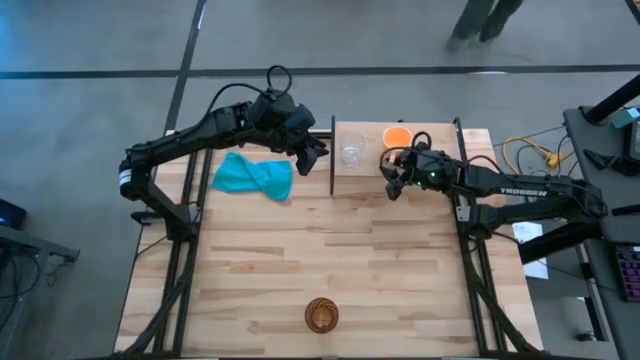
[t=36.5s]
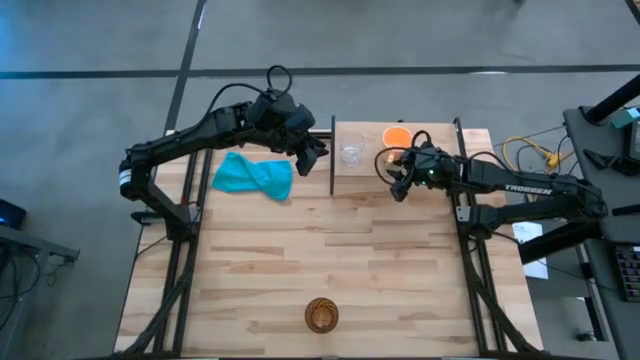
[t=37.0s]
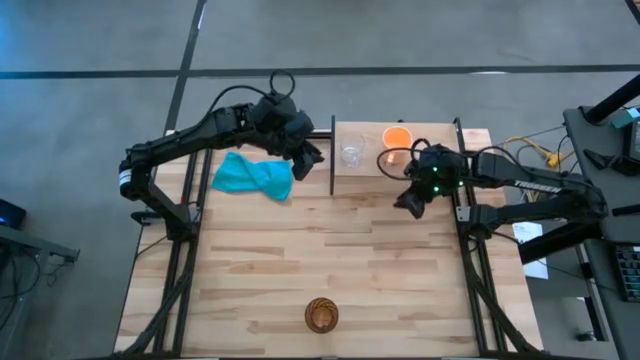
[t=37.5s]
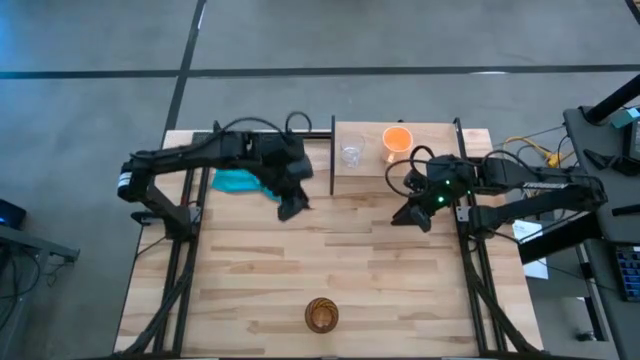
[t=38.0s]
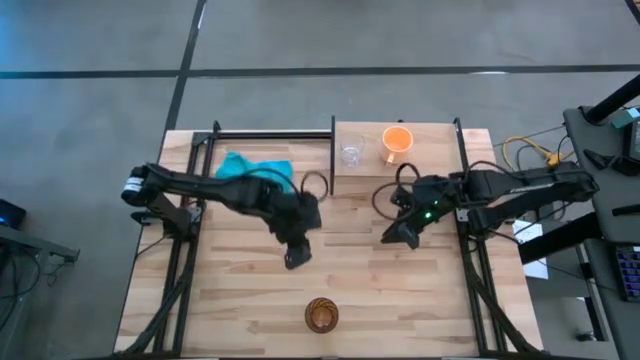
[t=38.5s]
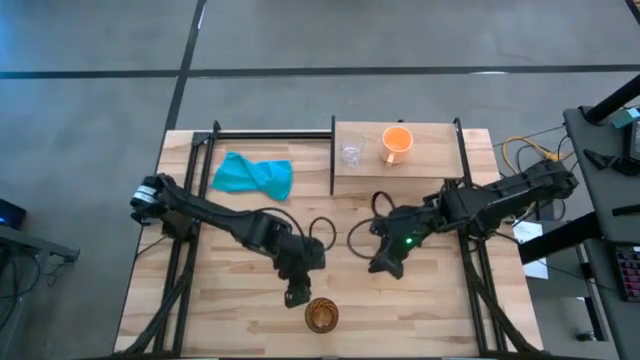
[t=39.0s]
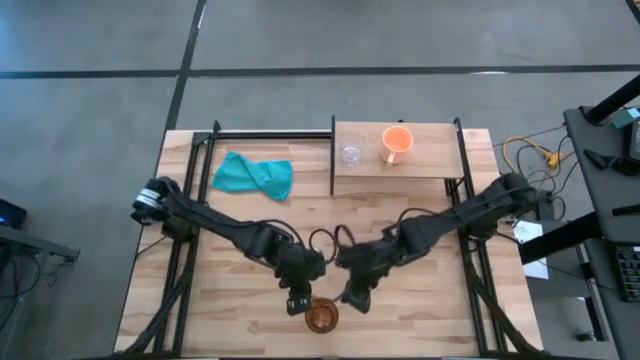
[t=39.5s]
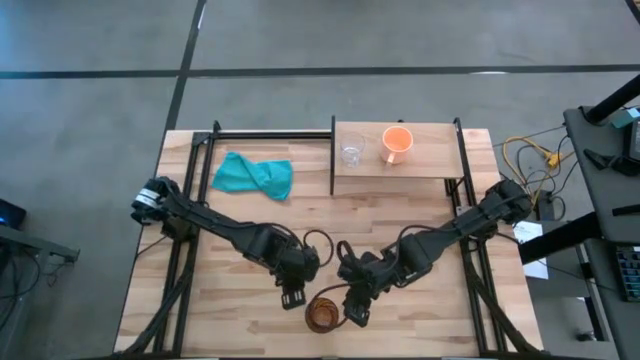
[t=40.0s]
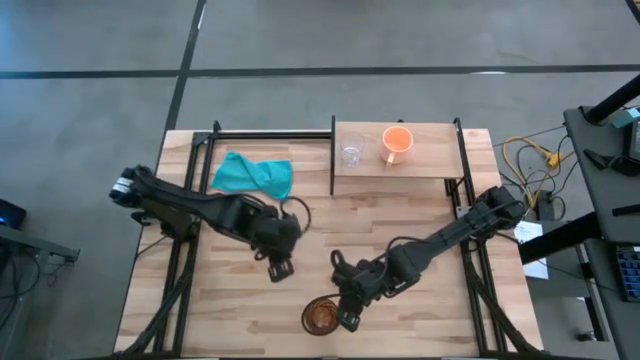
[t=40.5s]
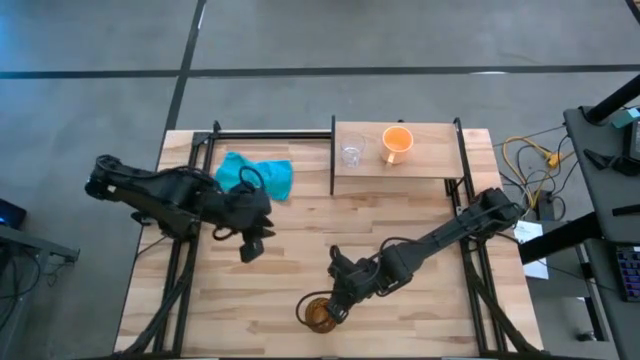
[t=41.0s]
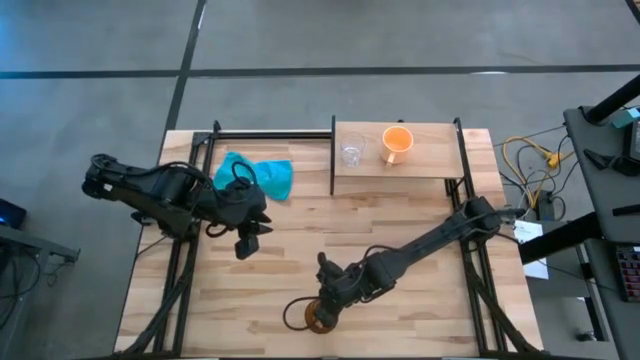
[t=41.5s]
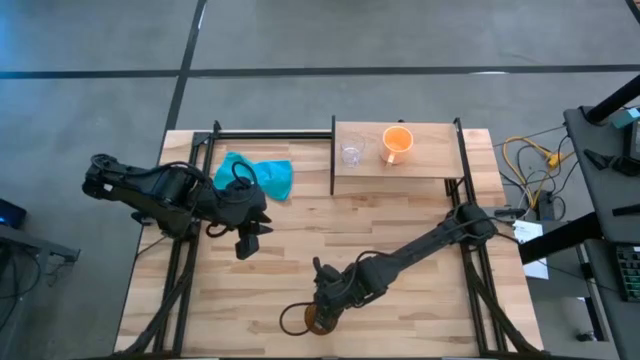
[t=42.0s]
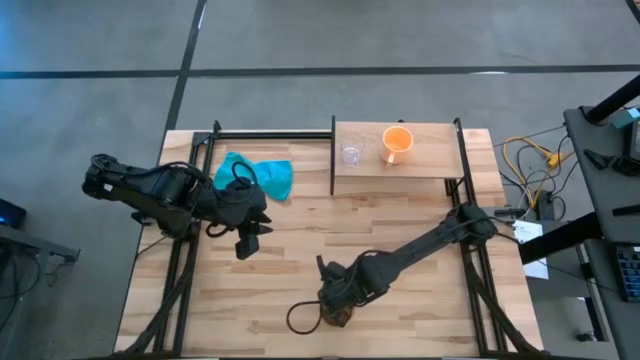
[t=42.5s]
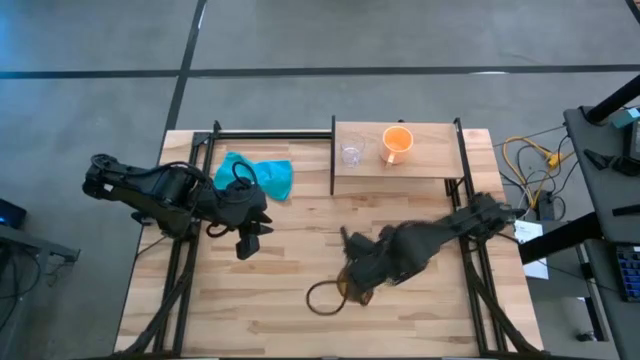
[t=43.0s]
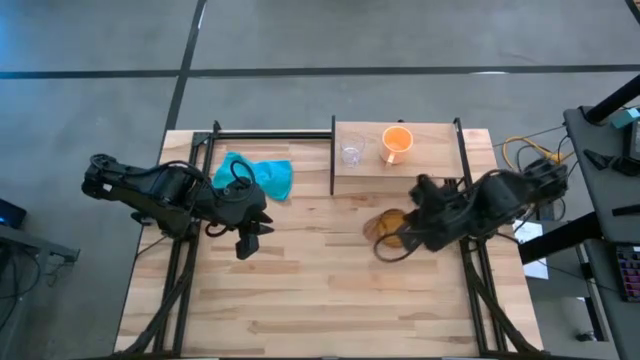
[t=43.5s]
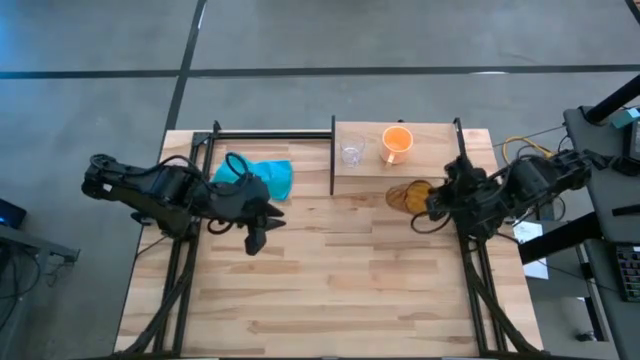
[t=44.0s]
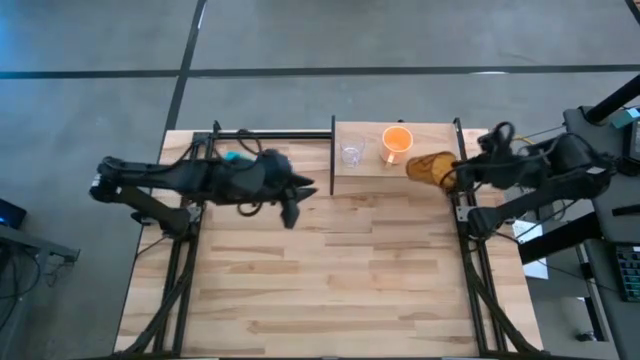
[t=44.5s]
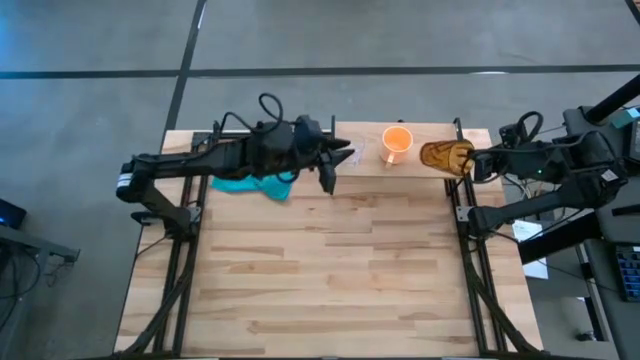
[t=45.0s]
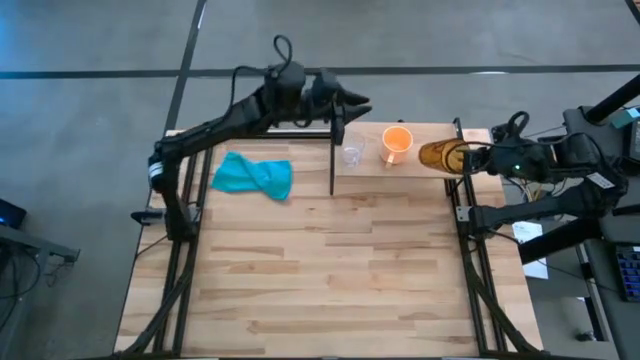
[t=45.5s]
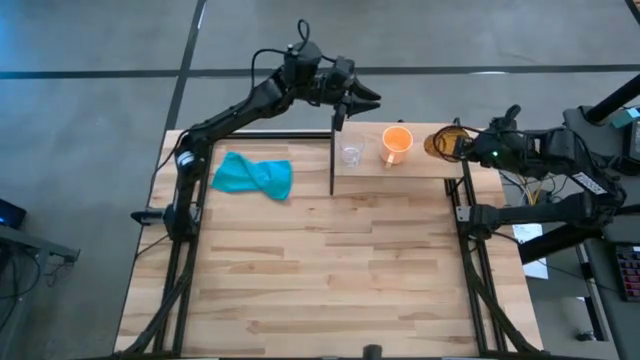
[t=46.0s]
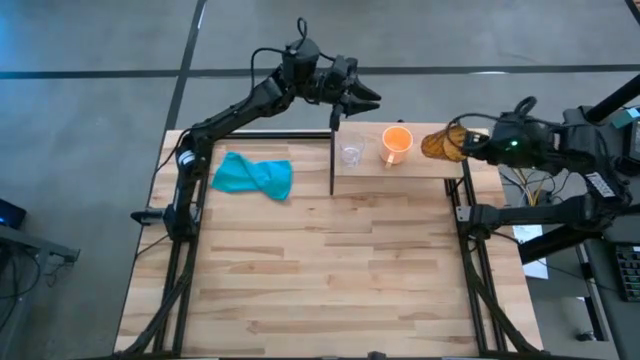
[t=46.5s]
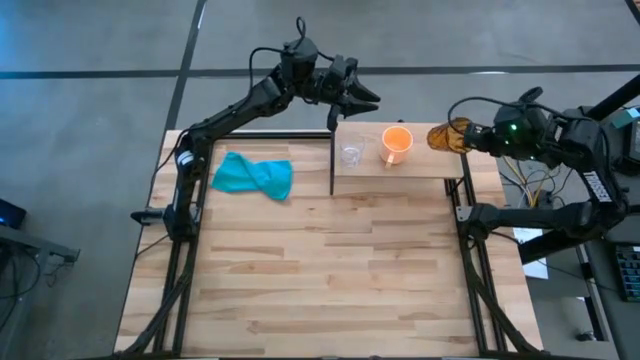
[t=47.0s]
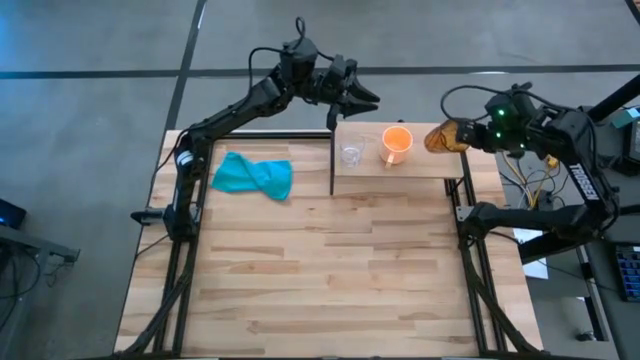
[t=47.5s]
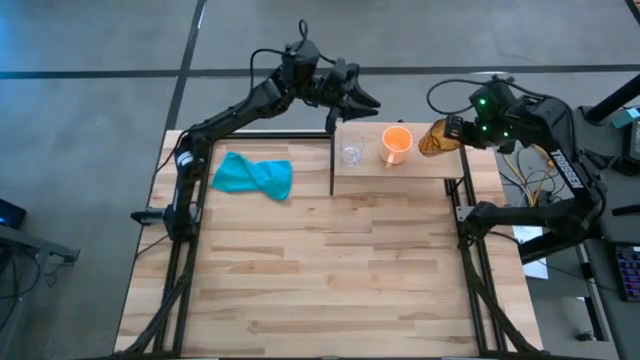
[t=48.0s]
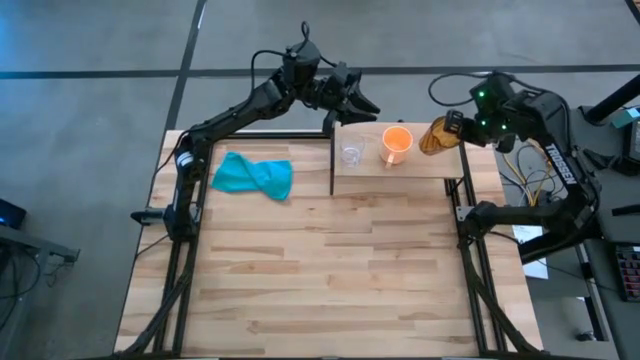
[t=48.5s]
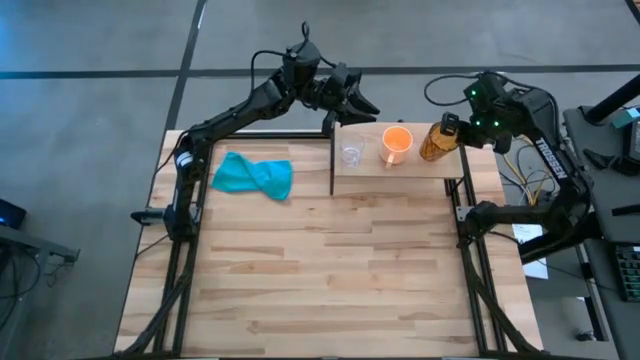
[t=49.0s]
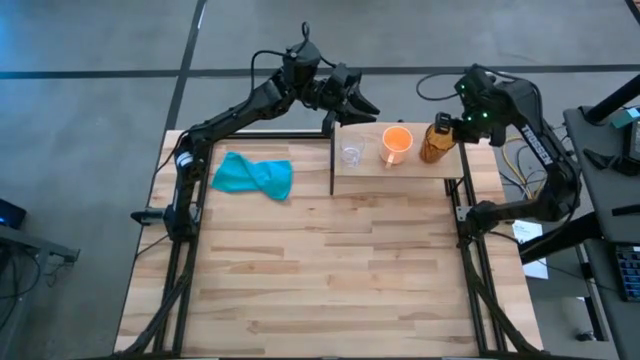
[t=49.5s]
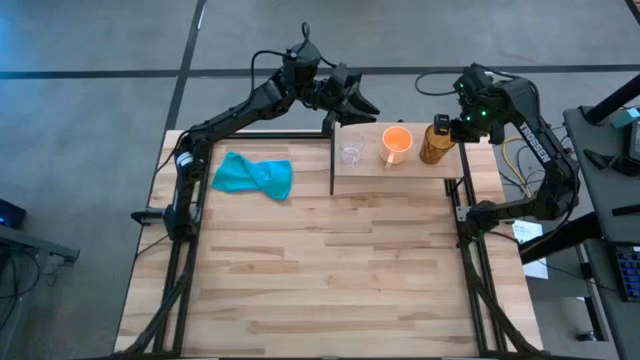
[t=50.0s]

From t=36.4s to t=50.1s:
Task: Stack small to large cups/mugs on shelf
Put the brown glass on the shelf

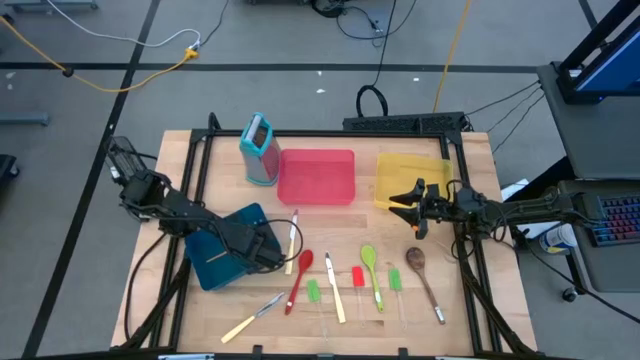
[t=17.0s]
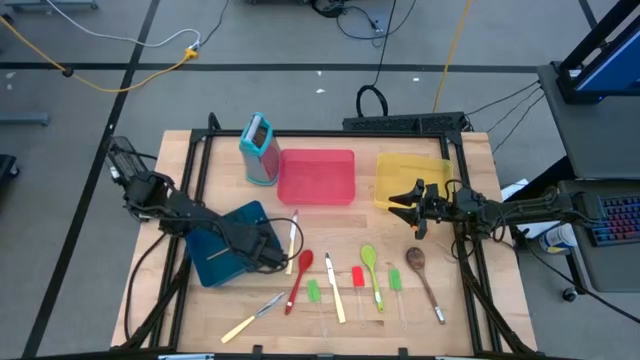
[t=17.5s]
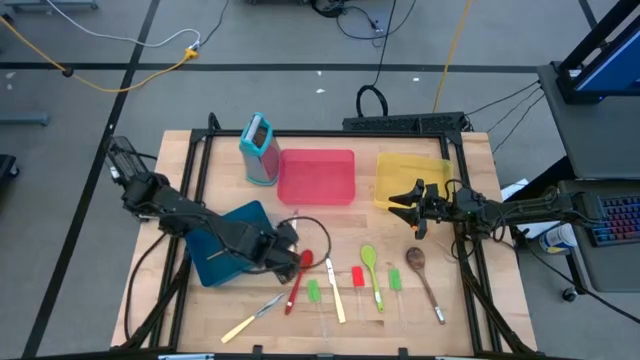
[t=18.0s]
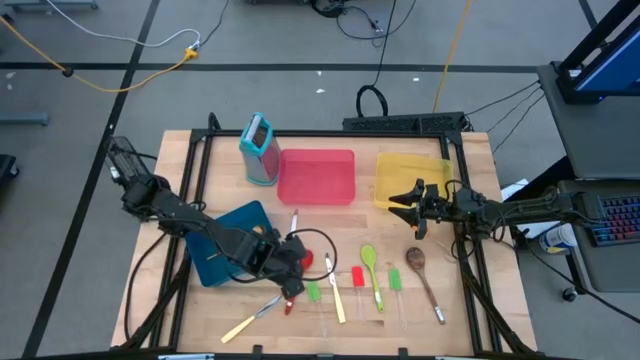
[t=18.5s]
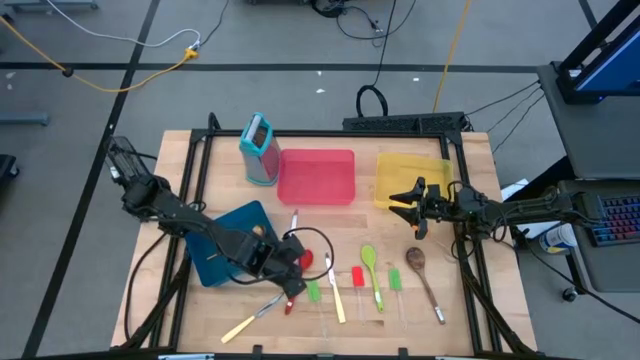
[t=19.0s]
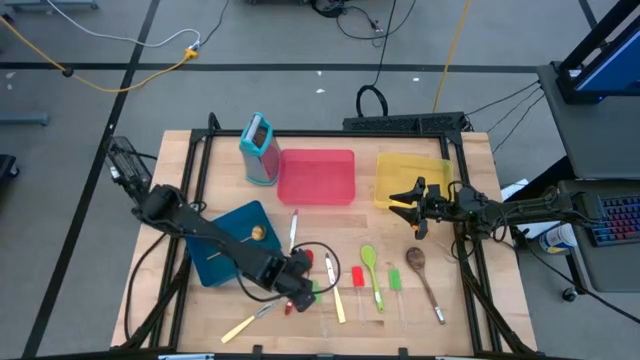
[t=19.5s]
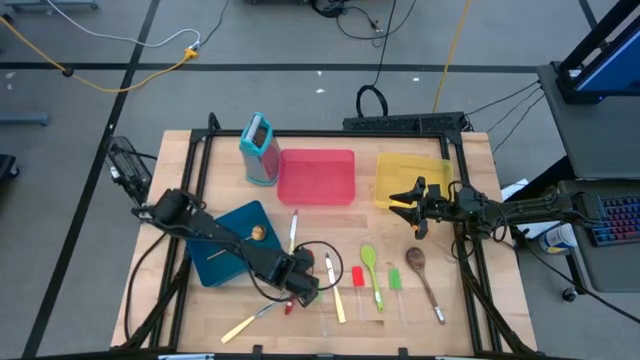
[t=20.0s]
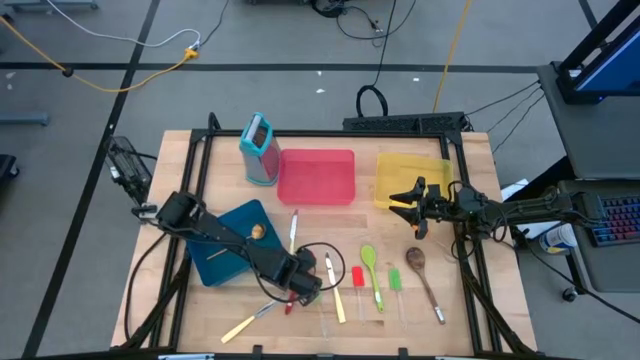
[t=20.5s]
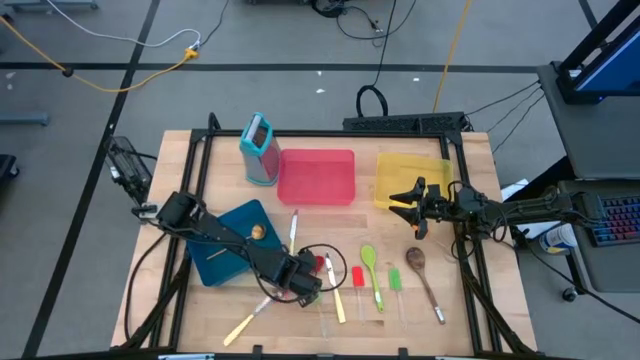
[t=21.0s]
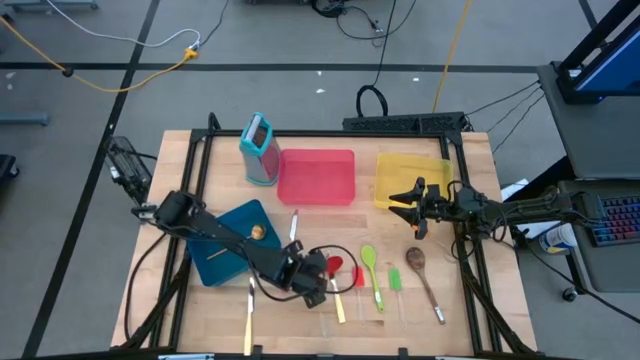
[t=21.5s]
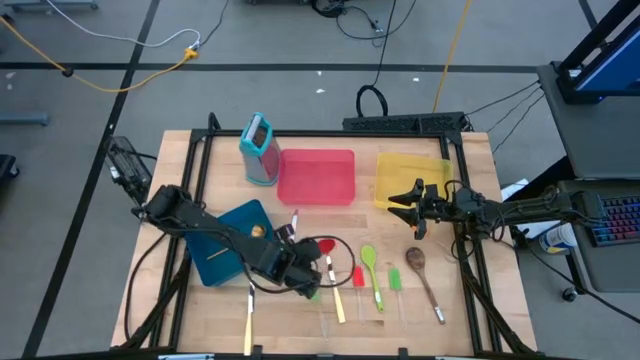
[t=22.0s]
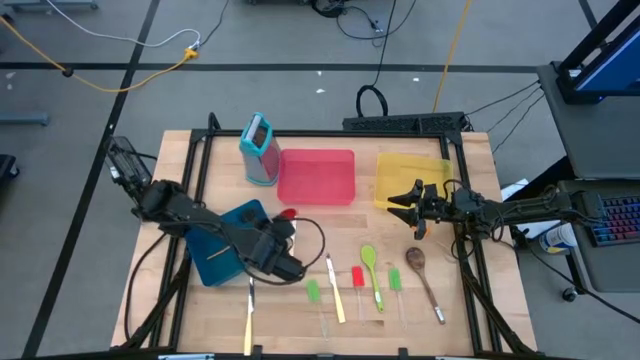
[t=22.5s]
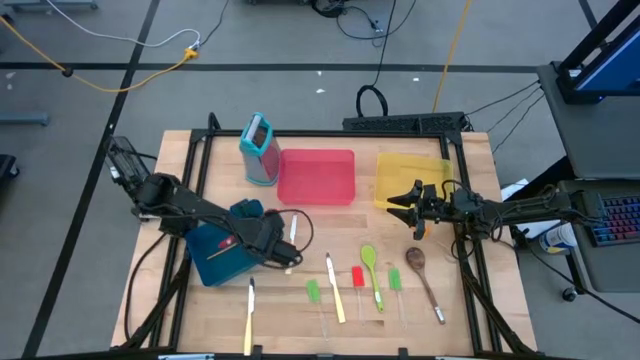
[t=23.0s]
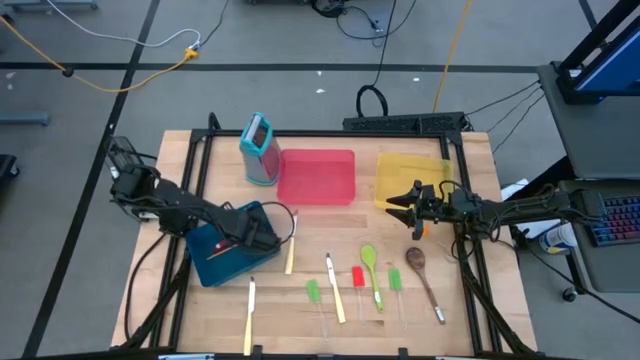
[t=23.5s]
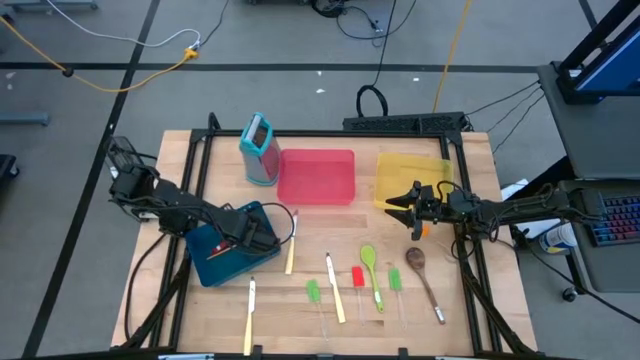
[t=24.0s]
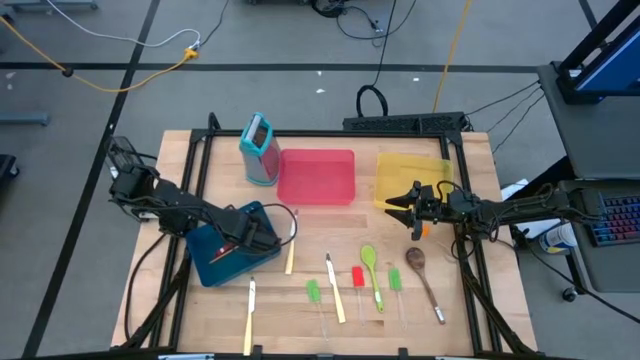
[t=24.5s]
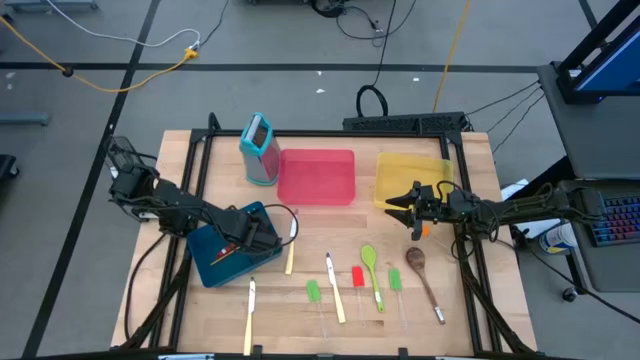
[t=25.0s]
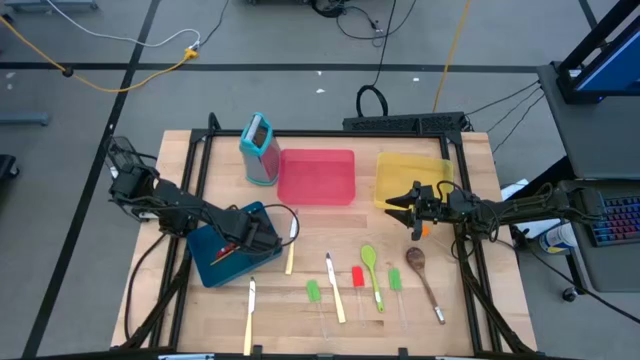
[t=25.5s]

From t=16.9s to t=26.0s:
Task: Pick & Place Kitchen Items
Put the red serving spoon into the blue bin
